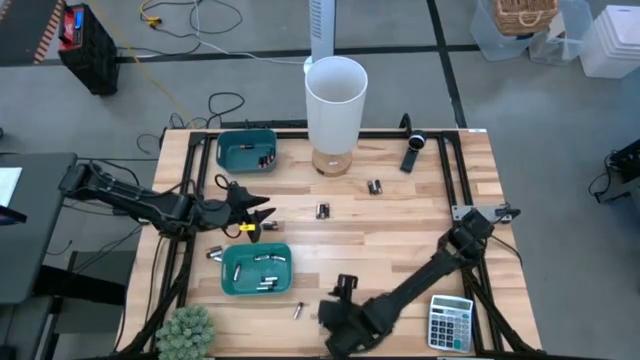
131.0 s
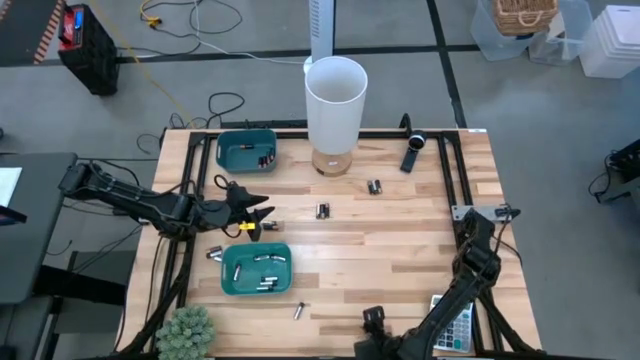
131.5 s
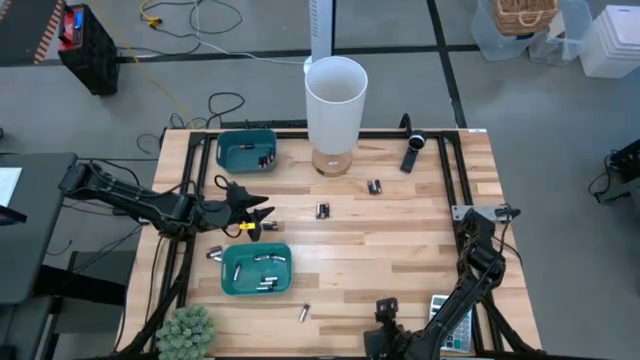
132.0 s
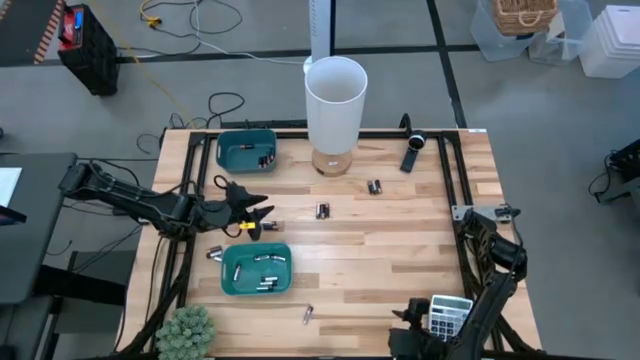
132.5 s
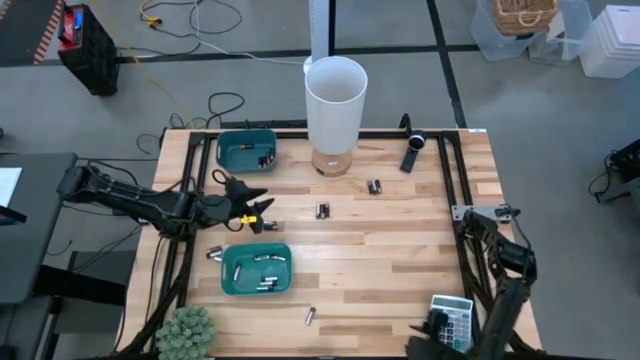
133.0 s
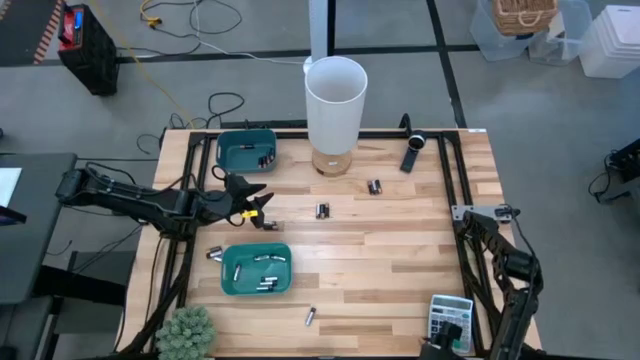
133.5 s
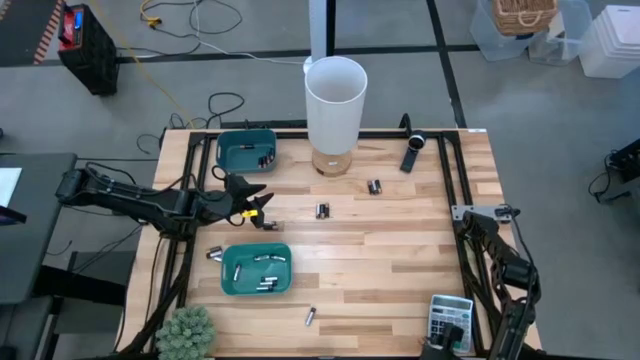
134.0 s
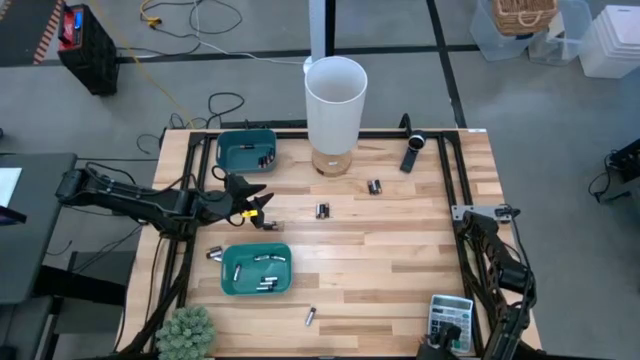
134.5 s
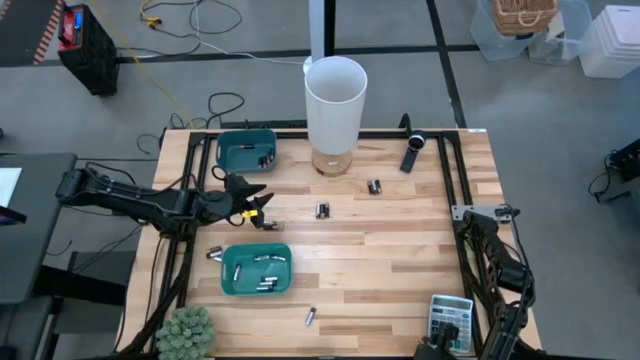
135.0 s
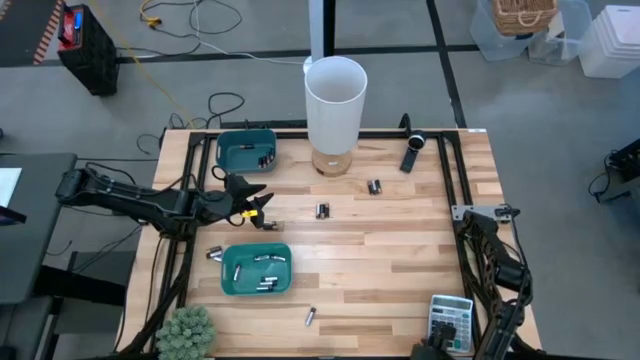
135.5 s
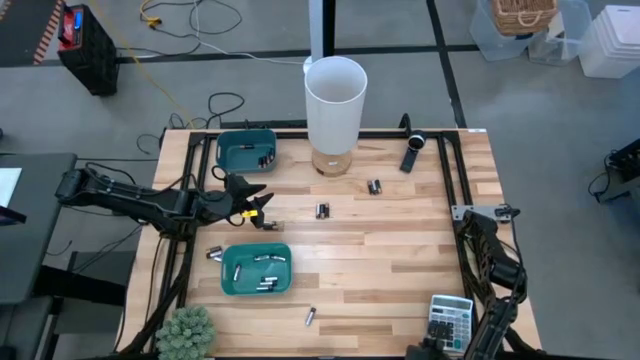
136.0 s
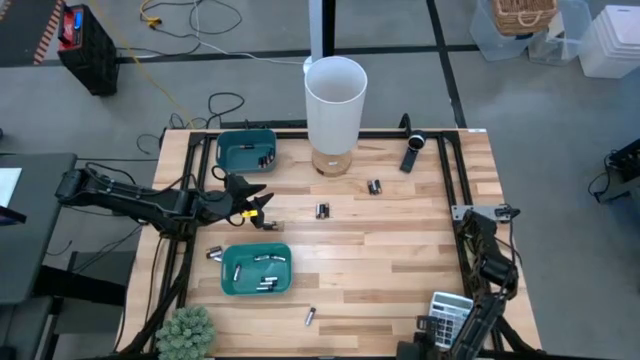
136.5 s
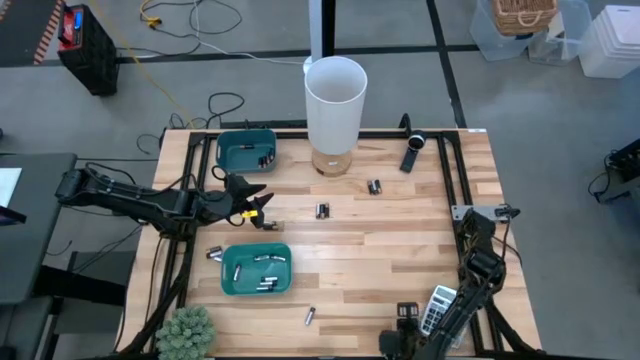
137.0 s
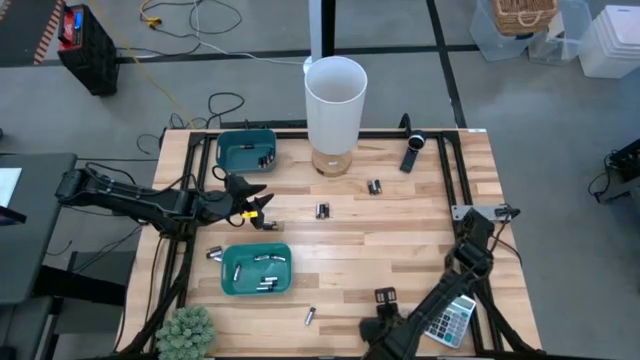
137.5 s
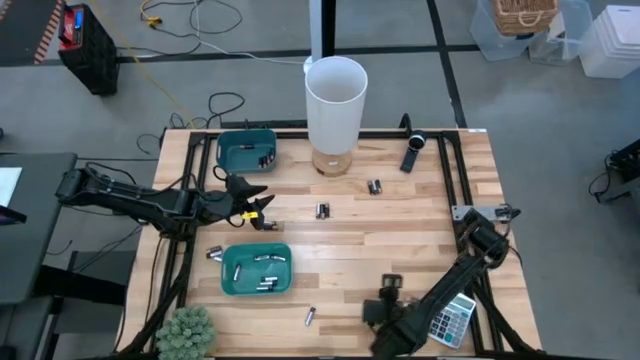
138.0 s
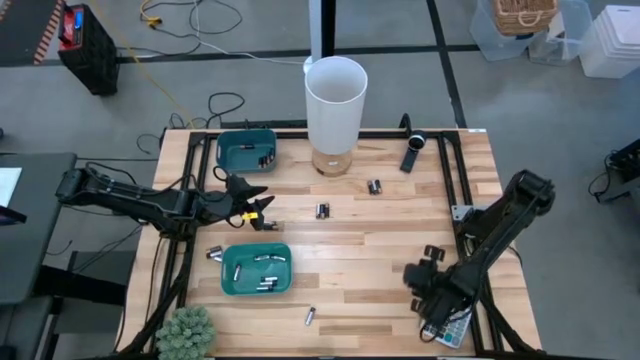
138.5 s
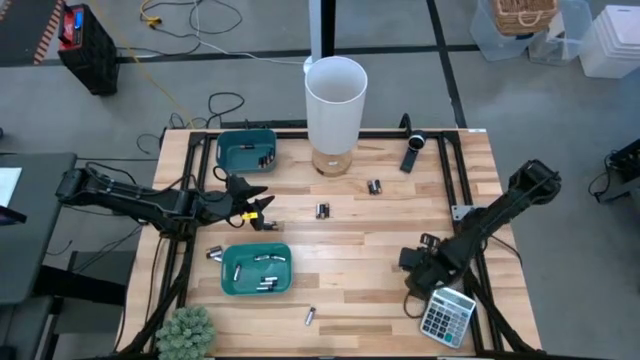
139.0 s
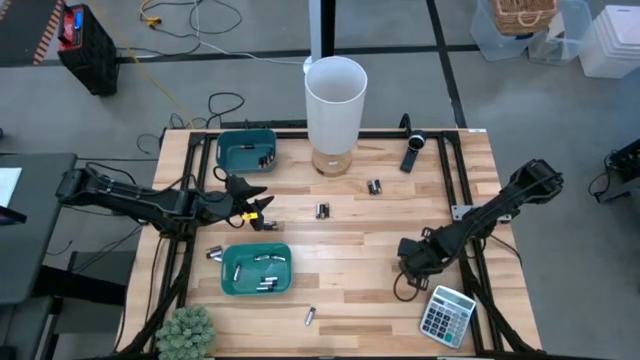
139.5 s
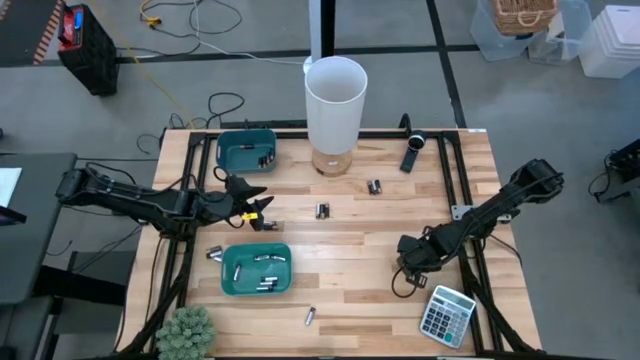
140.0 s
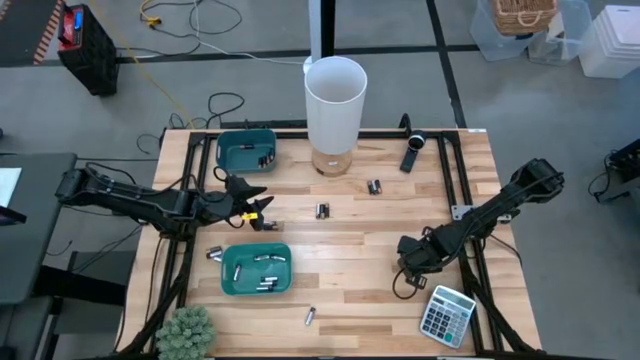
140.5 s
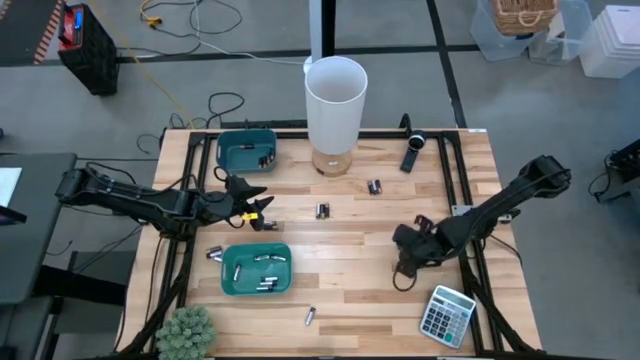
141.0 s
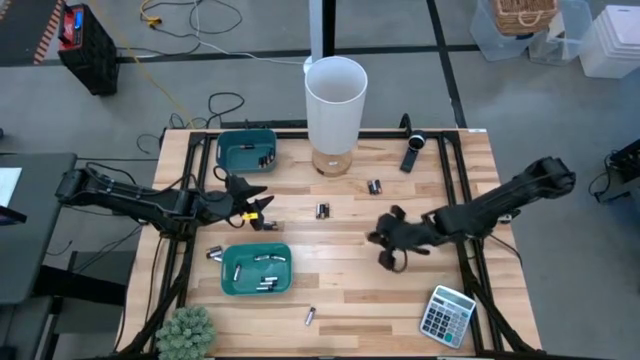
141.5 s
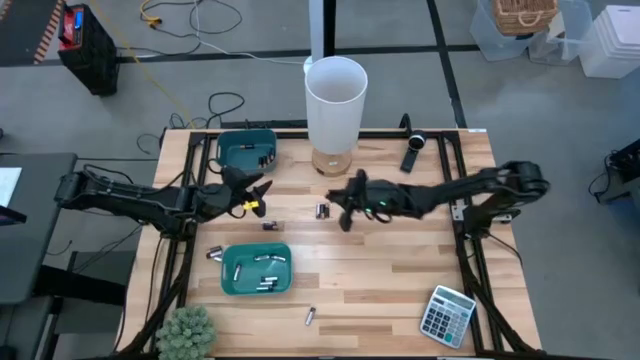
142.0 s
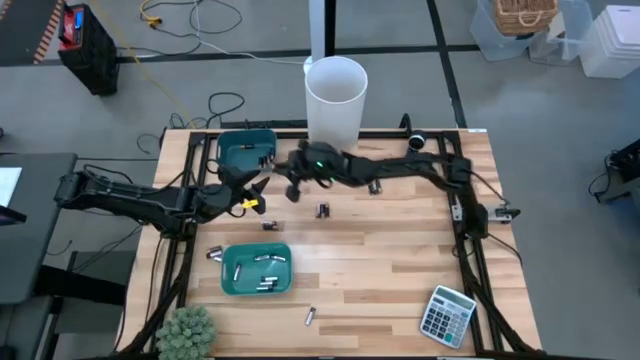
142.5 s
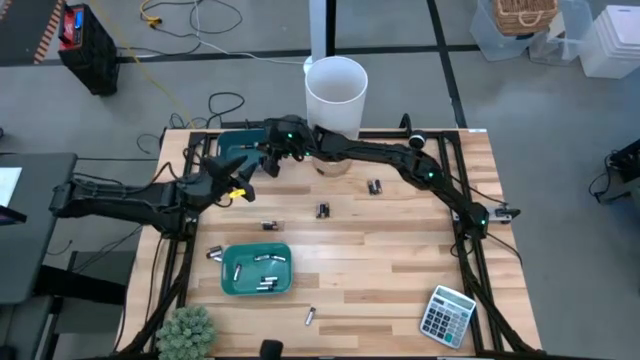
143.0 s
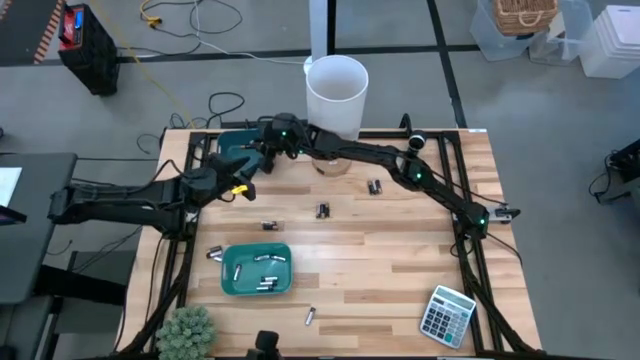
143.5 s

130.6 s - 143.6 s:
Task: Sort batteries
Put the black battery into the blue bin

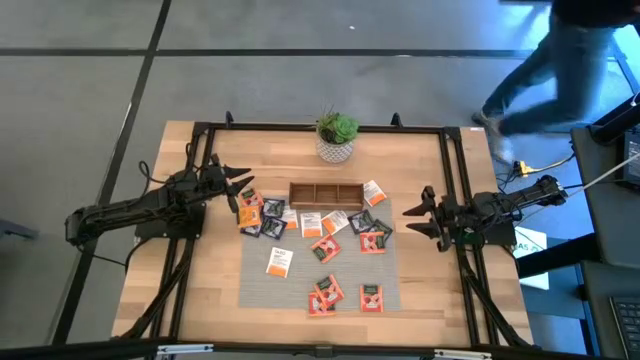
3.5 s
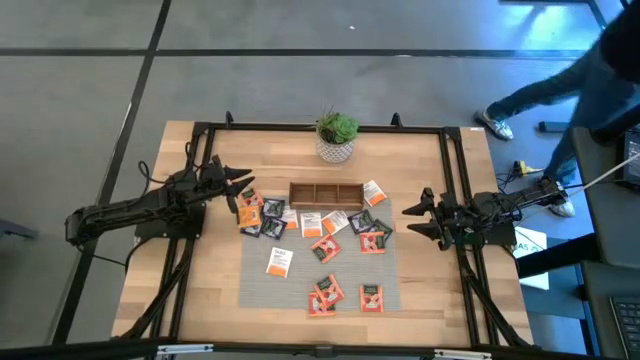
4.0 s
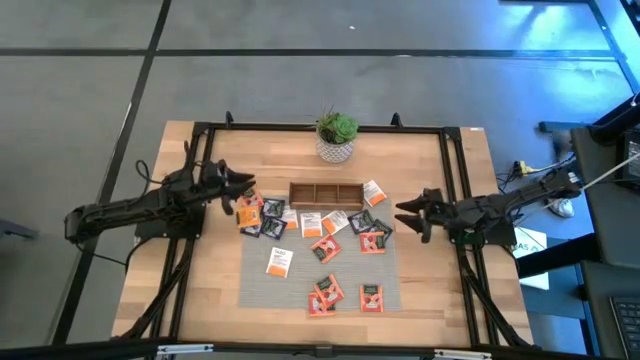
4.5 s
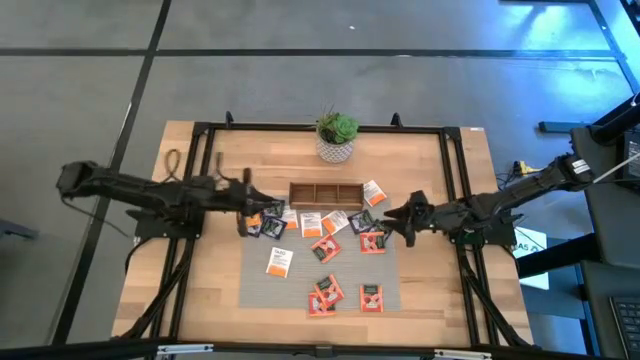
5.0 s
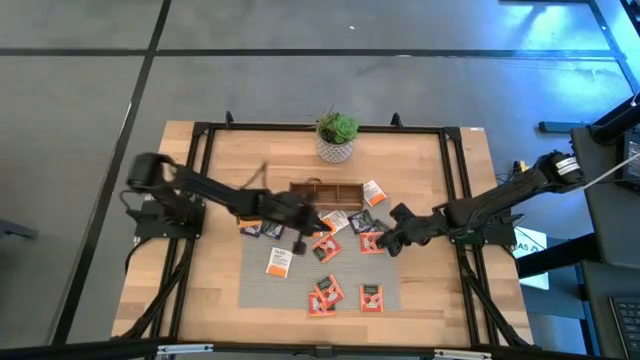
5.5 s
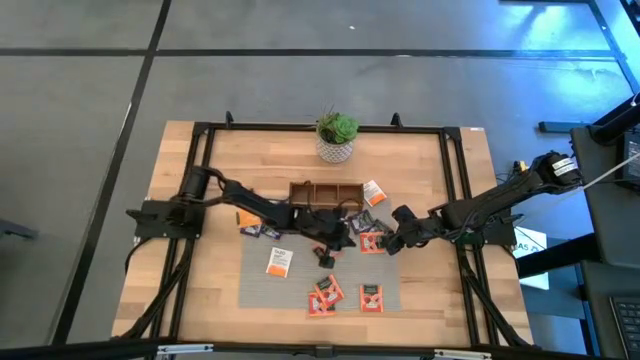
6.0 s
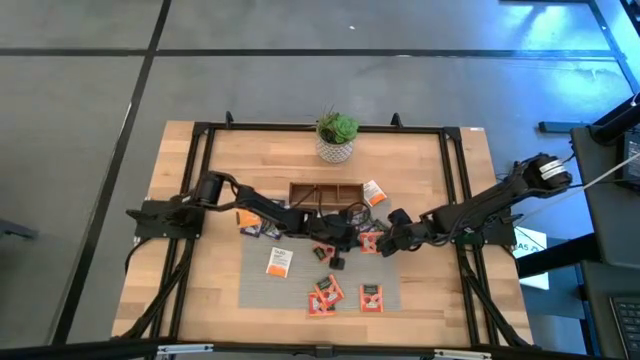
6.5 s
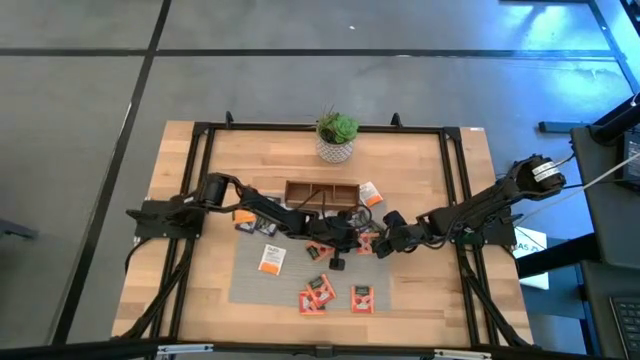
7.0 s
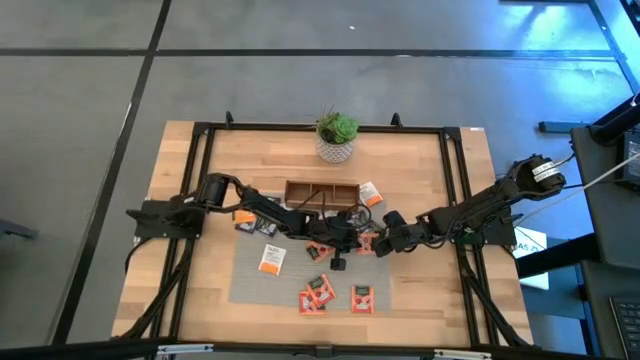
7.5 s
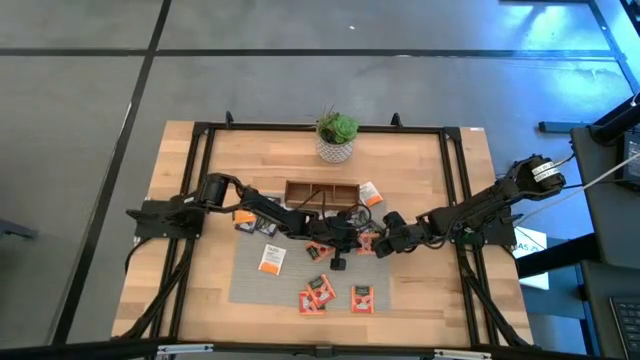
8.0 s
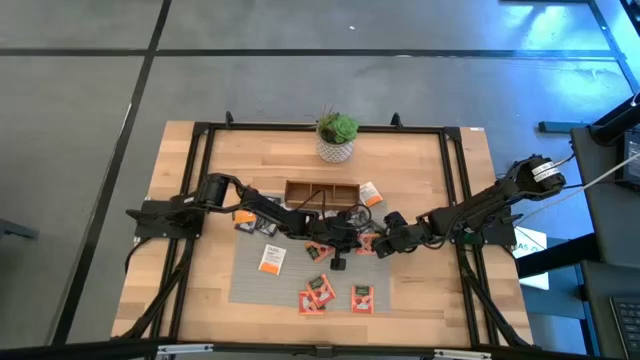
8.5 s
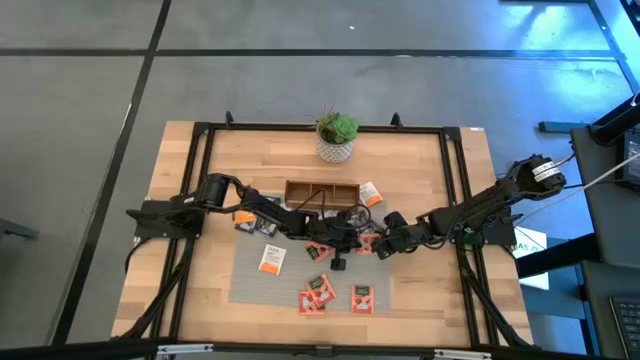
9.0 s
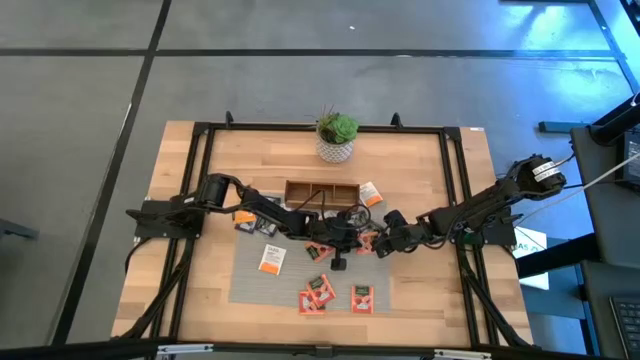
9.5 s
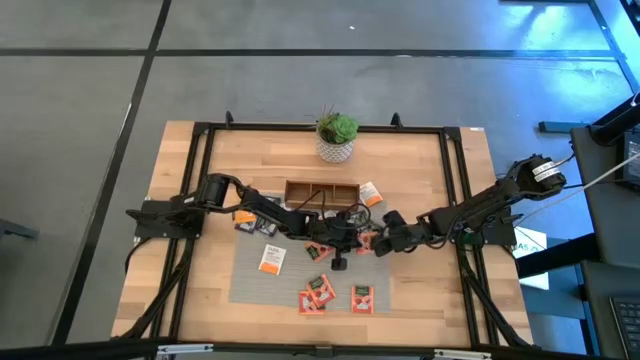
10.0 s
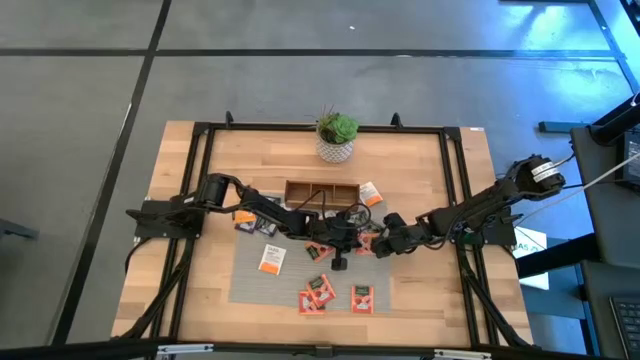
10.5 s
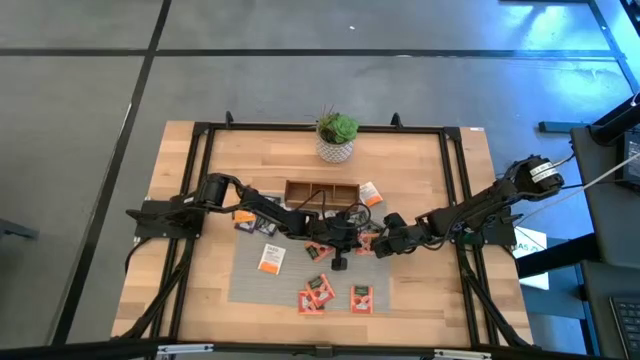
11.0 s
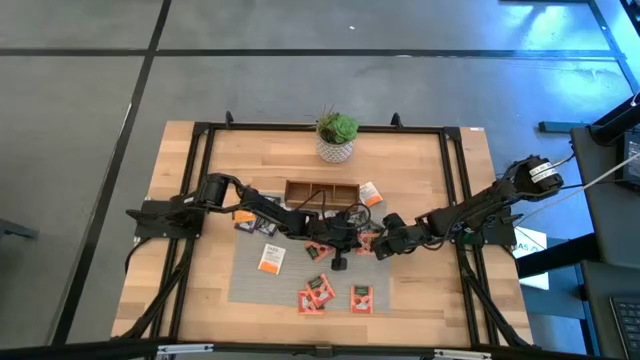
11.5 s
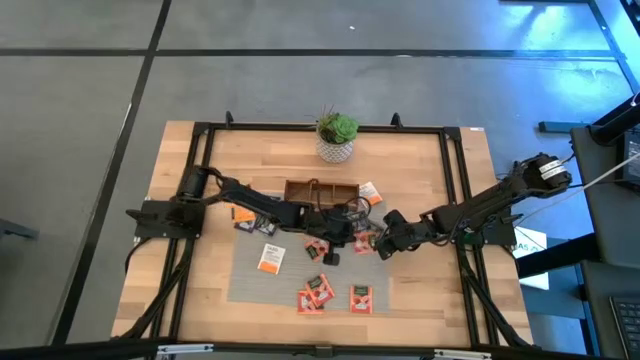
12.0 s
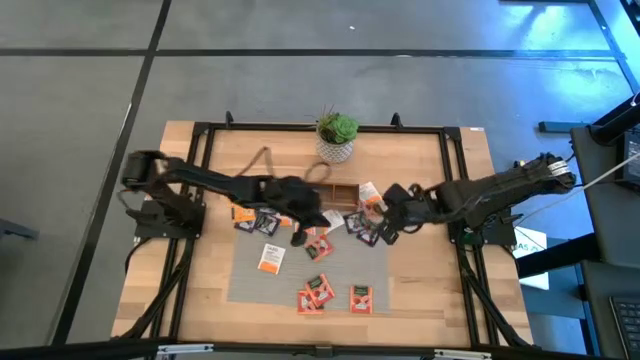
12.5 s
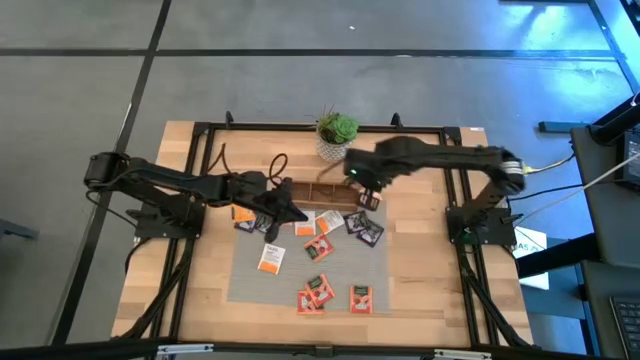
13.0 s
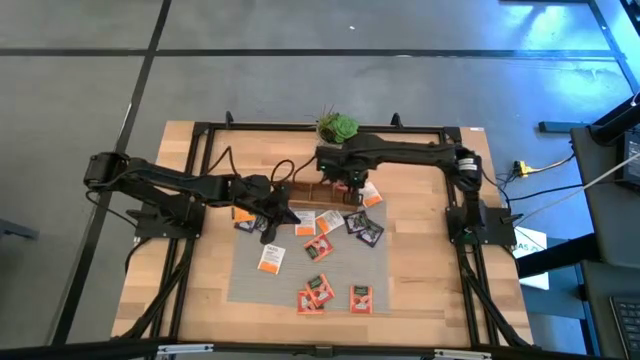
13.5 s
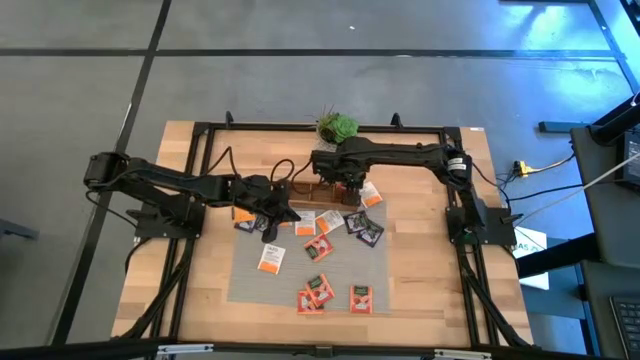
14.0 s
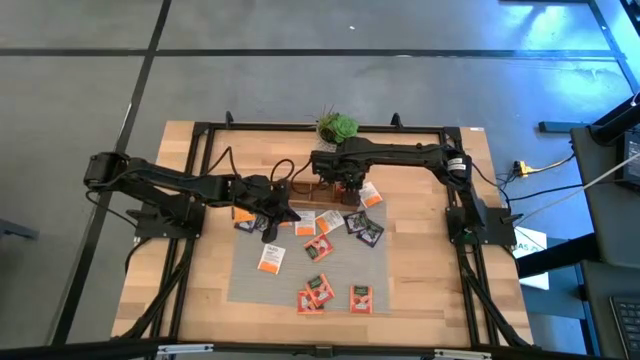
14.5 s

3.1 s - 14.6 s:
Task: Pick & Place Tea
Put the orange tea bag into the right section of the wooden organizer
